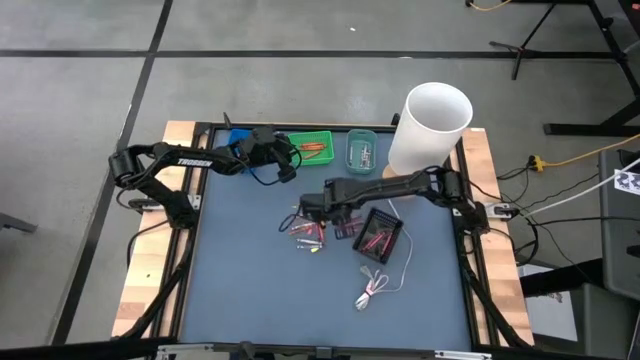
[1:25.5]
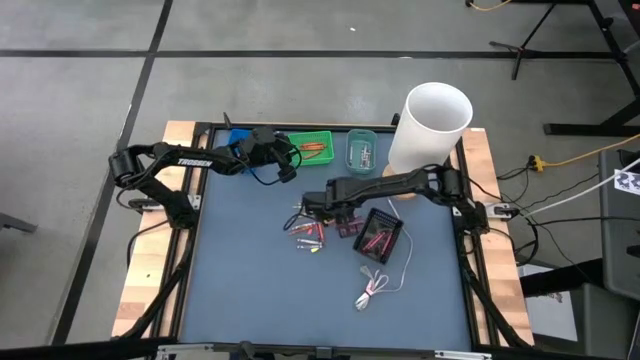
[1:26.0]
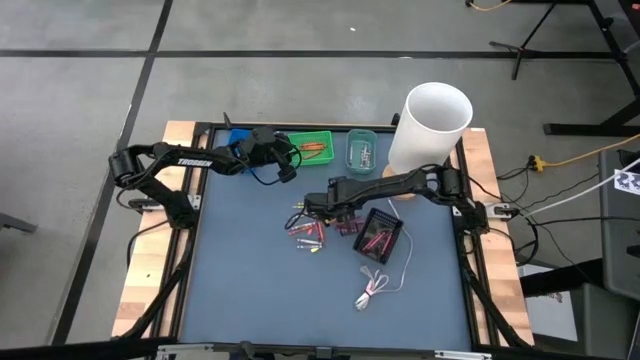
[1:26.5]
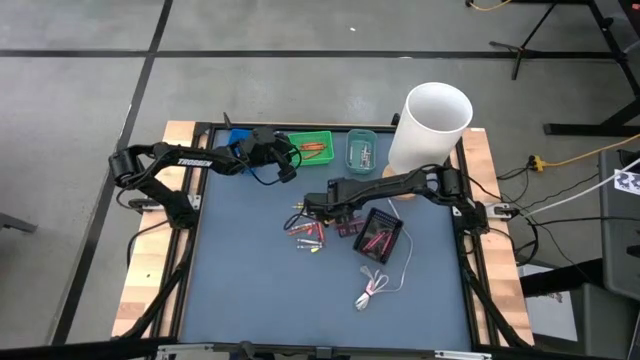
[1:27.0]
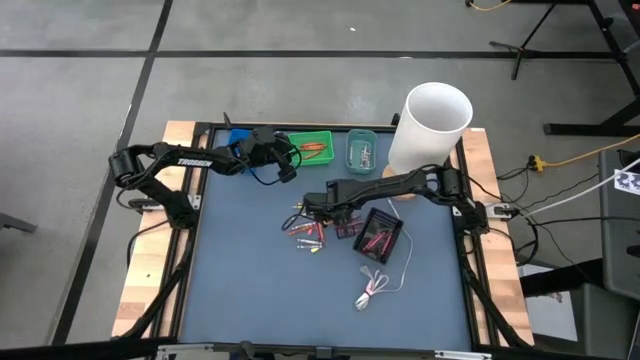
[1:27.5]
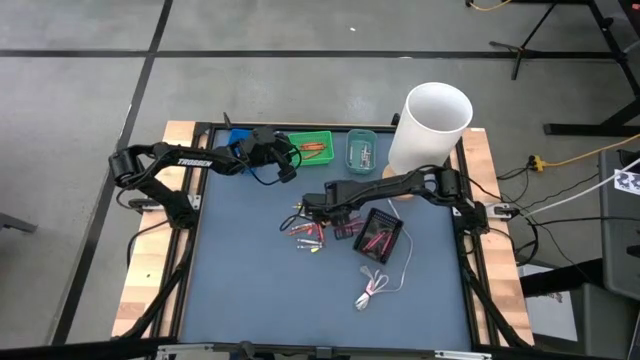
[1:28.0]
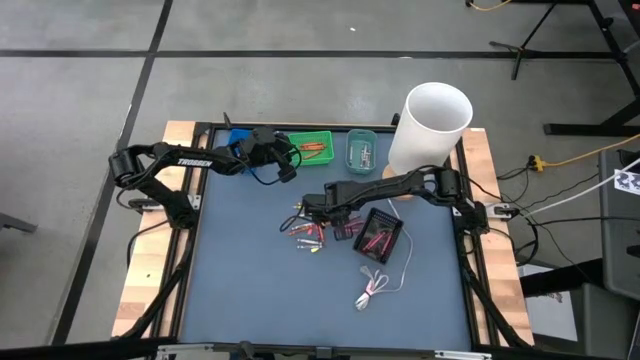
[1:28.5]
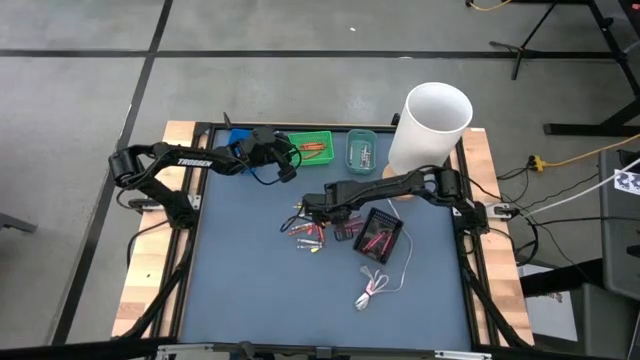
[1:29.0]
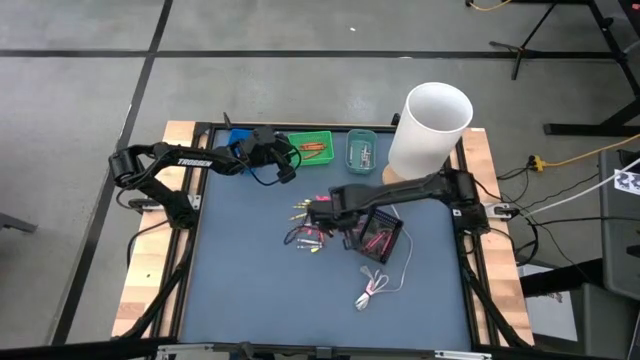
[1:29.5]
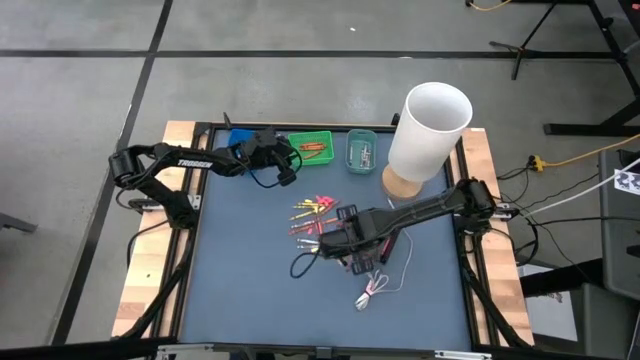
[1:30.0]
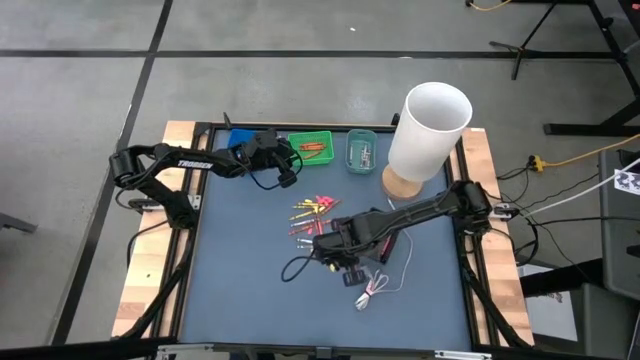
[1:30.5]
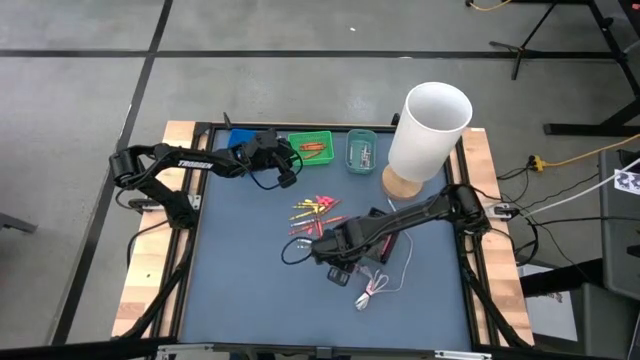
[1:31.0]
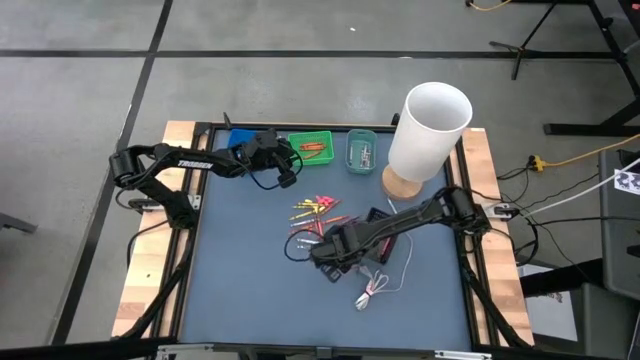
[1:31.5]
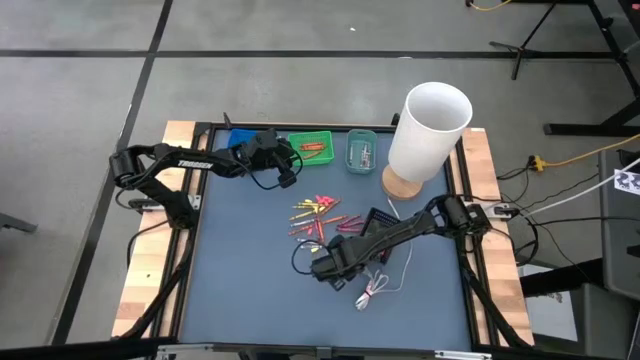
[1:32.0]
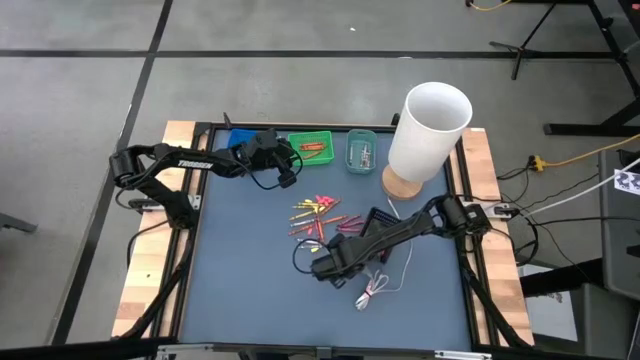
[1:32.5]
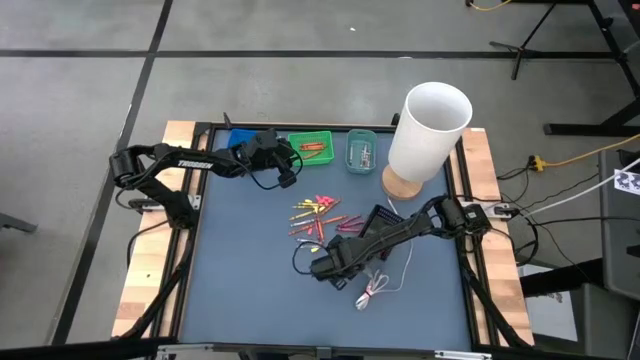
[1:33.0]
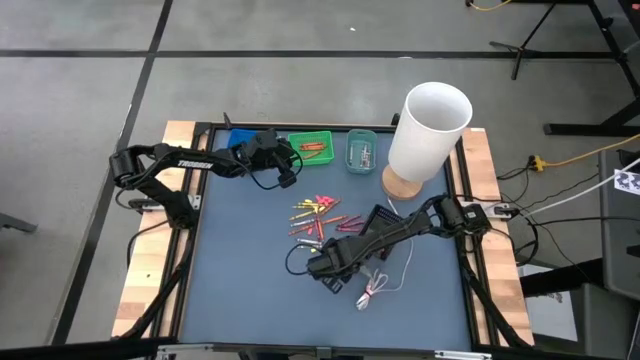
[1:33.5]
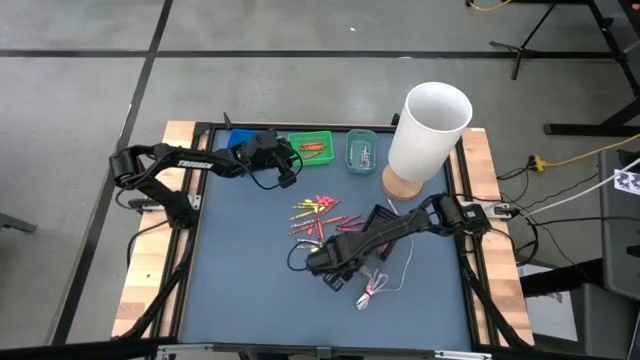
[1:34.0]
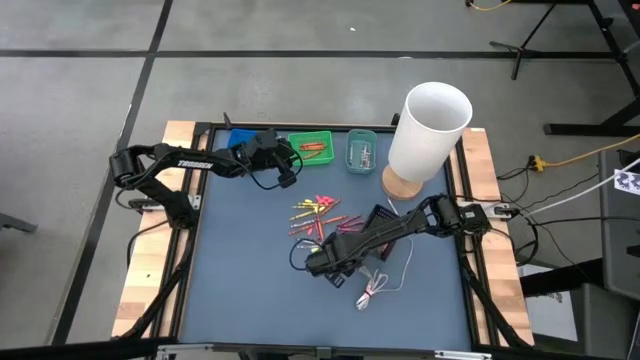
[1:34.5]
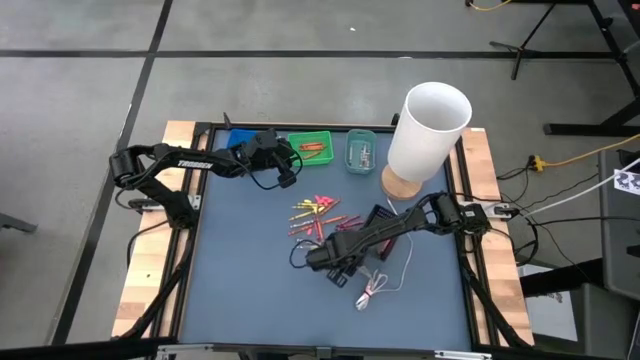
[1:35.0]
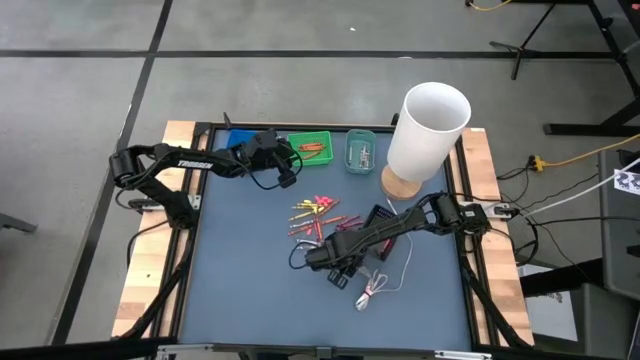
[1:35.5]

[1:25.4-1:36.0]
Task: Sort crayons
Put the red crayon into the black bin

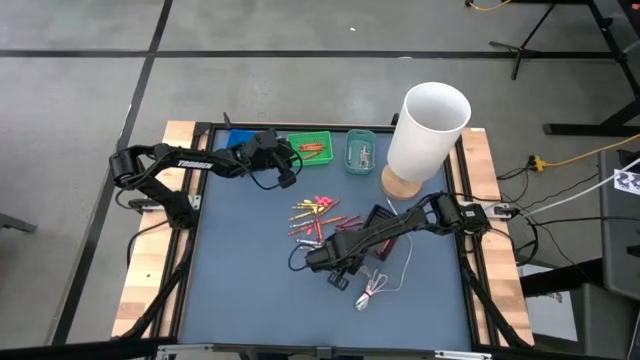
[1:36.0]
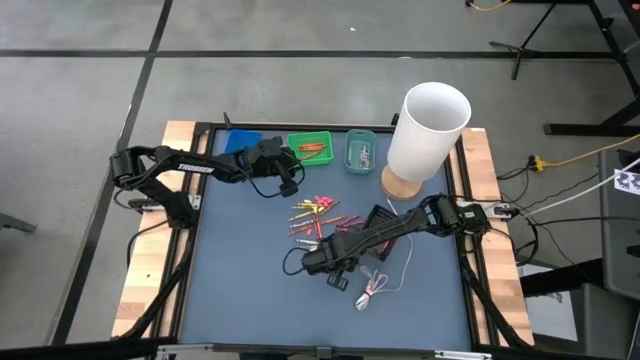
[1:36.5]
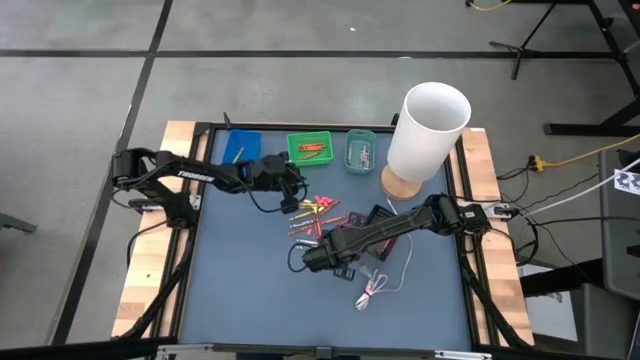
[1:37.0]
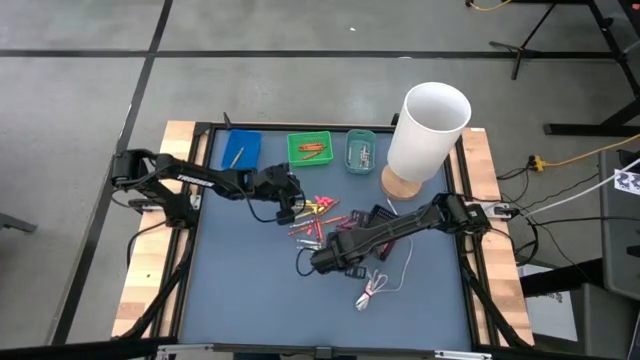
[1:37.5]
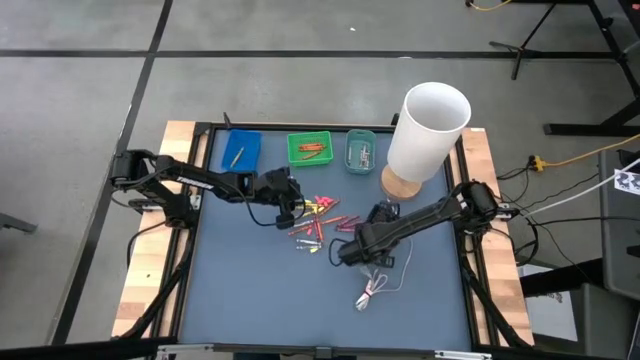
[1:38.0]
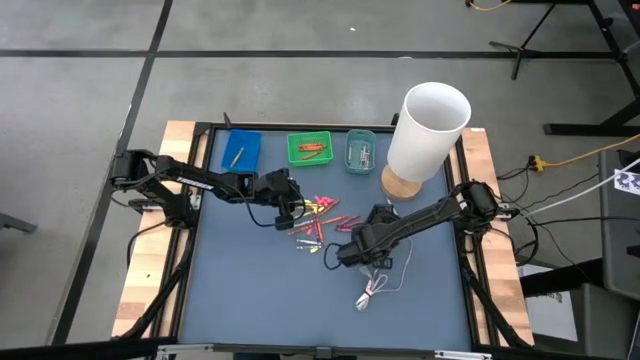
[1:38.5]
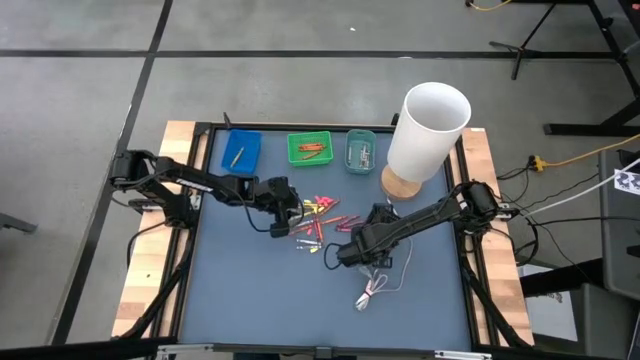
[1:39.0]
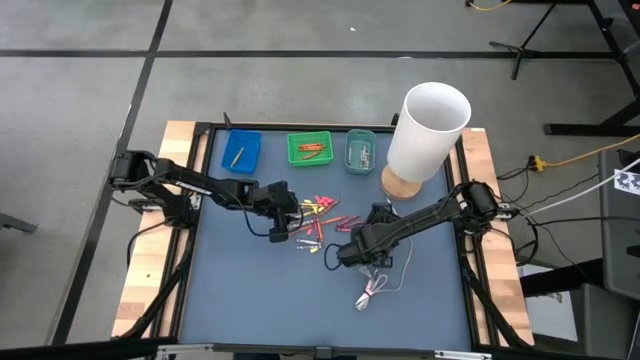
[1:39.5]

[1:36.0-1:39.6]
Put the red crayon into the black bin

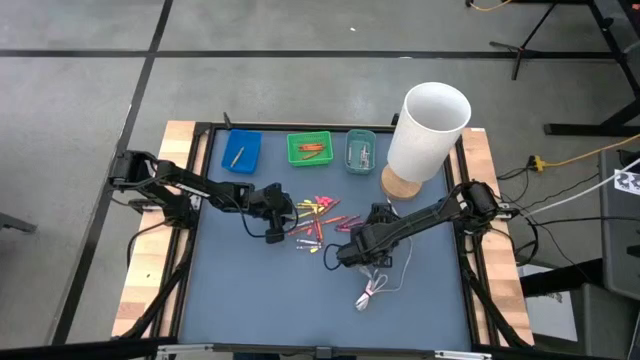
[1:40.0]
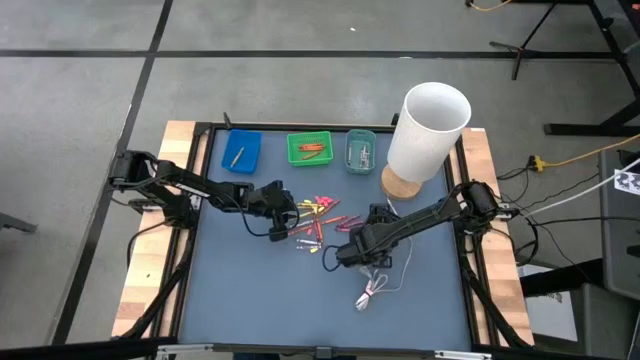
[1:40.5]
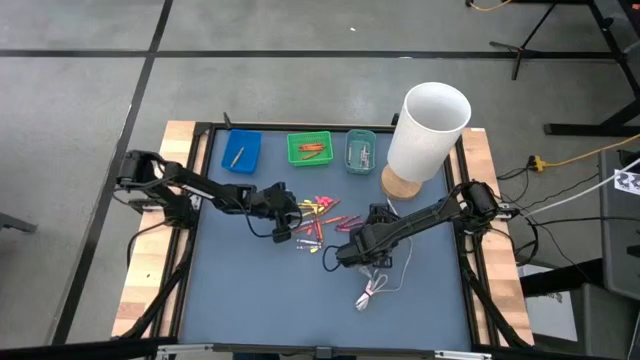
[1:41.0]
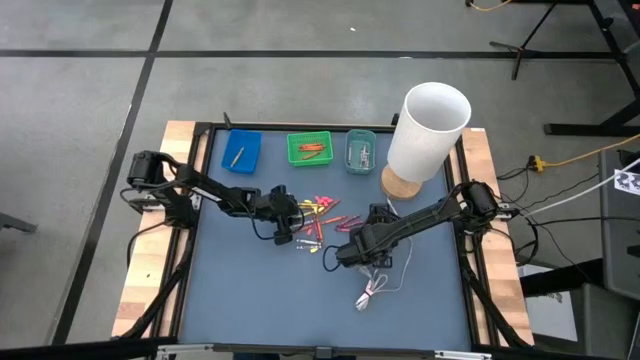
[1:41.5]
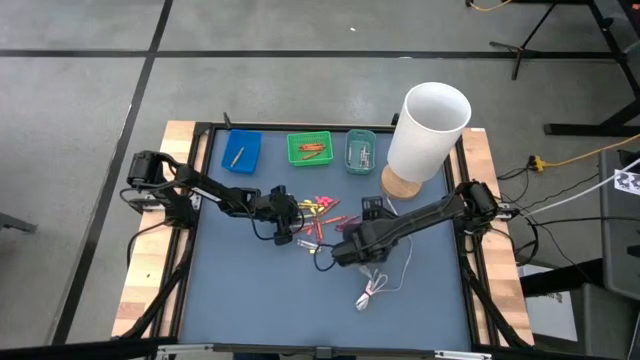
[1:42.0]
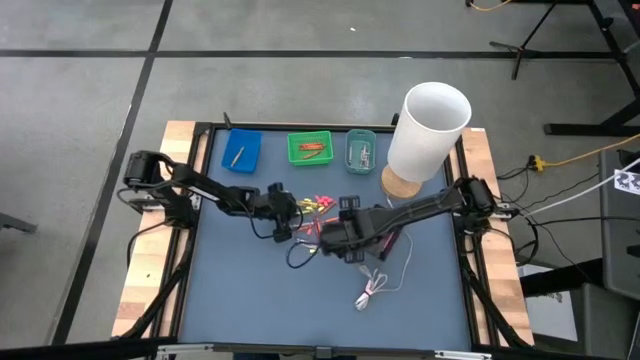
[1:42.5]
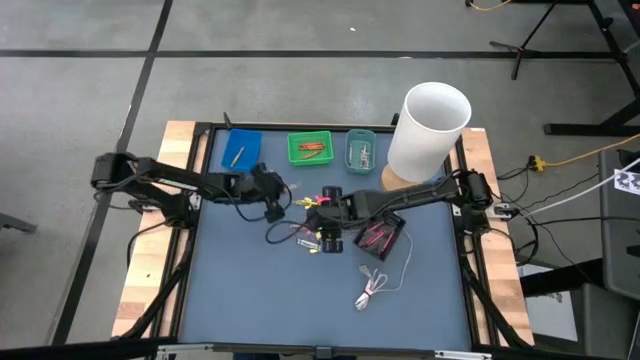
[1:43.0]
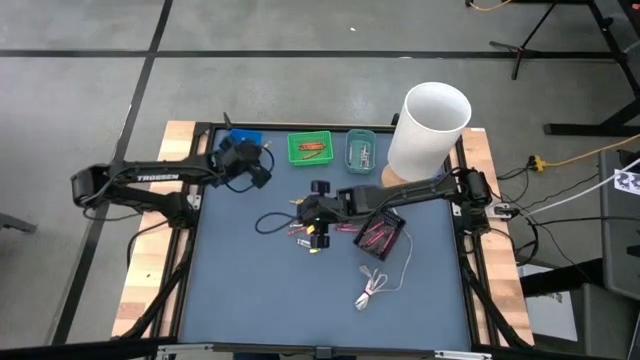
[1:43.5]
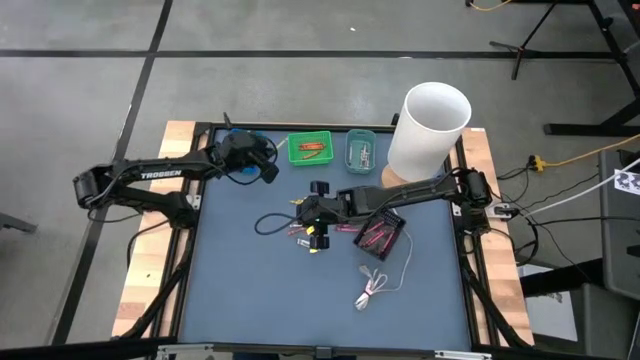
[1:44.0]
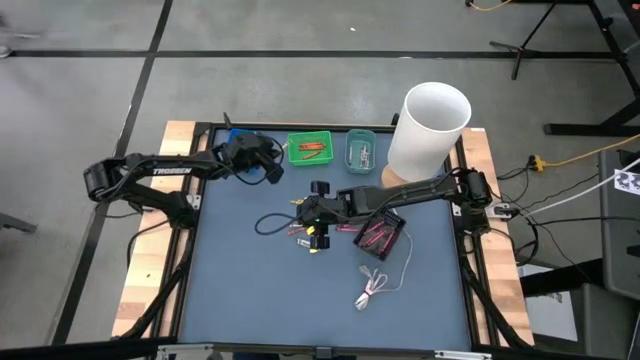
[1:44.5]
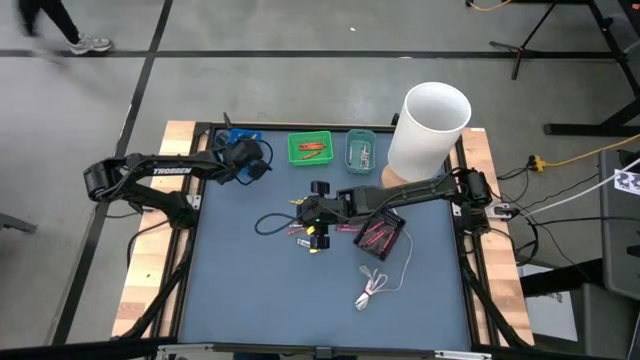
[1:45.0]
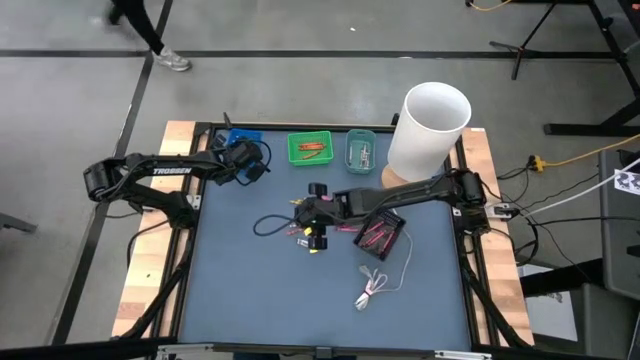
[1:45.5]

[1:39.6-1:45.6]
Put the yellow crayon into the blue bin
